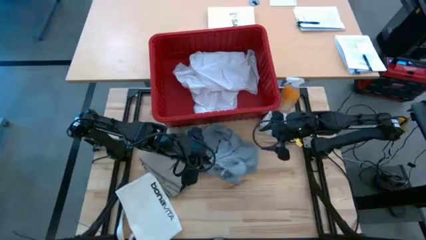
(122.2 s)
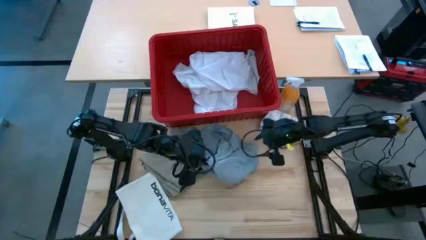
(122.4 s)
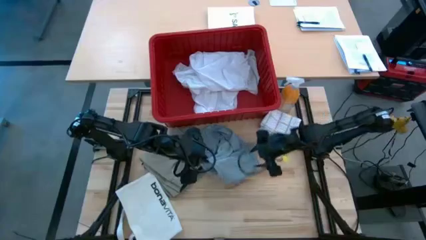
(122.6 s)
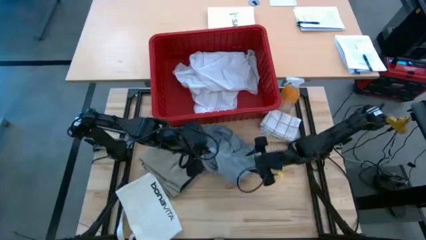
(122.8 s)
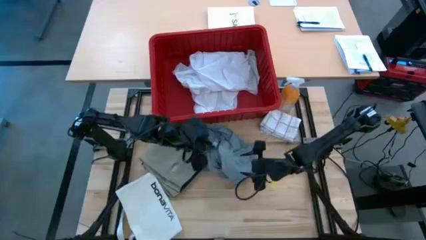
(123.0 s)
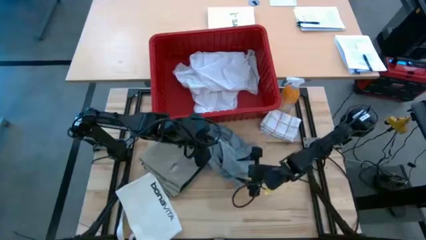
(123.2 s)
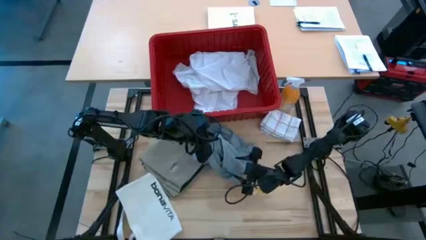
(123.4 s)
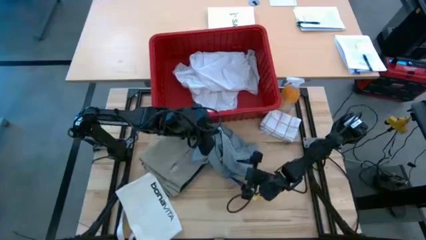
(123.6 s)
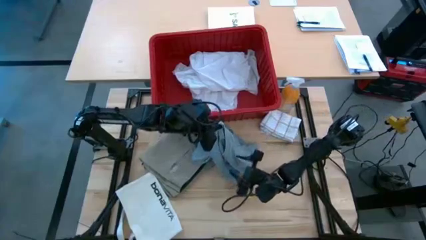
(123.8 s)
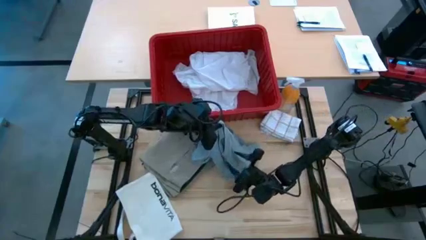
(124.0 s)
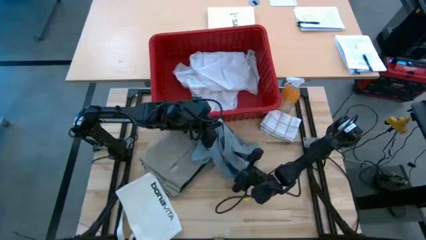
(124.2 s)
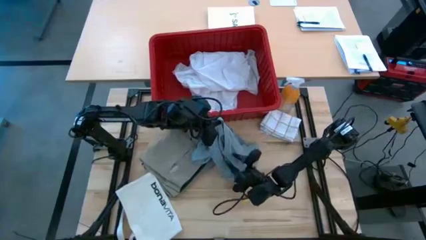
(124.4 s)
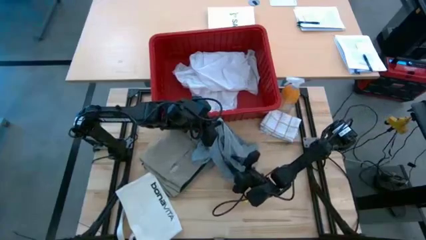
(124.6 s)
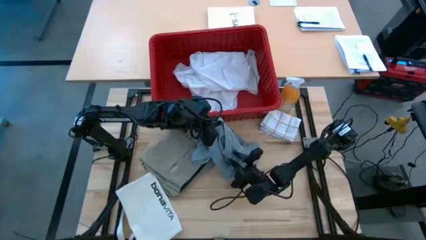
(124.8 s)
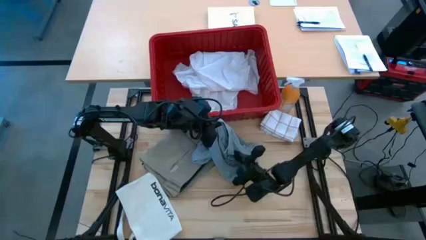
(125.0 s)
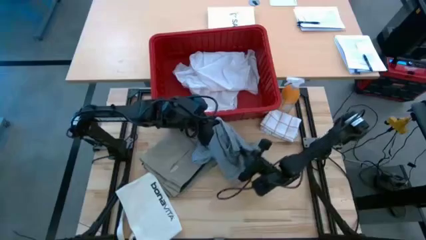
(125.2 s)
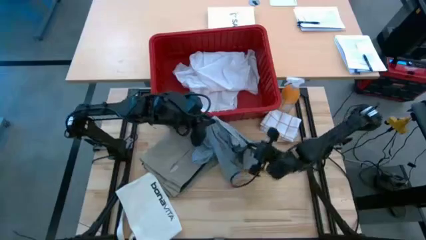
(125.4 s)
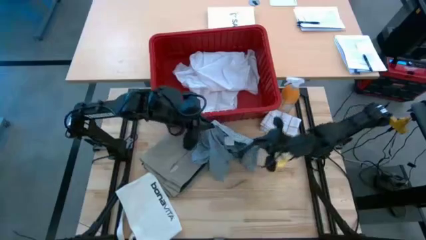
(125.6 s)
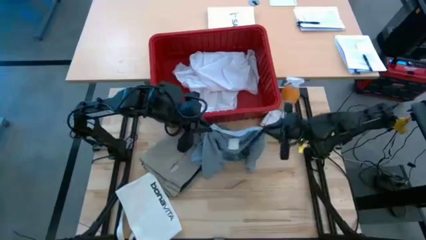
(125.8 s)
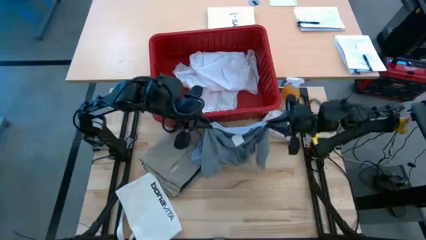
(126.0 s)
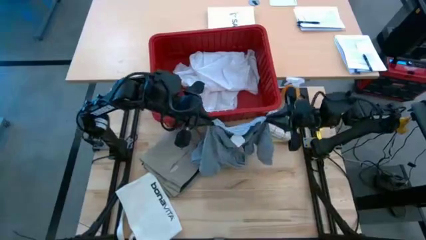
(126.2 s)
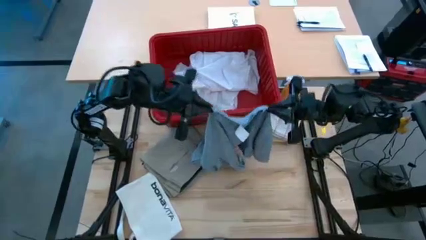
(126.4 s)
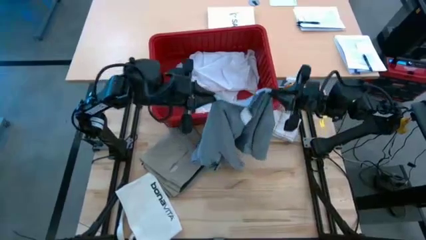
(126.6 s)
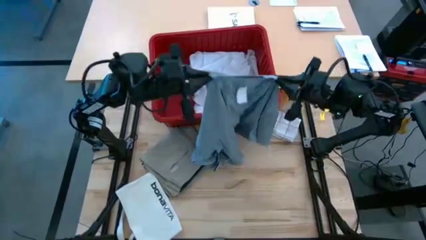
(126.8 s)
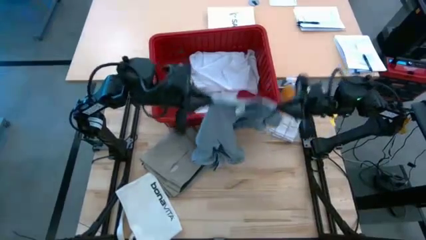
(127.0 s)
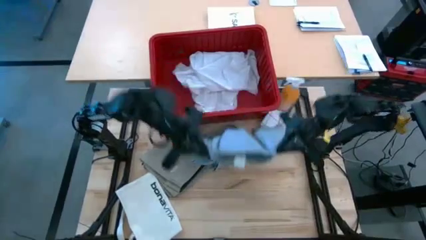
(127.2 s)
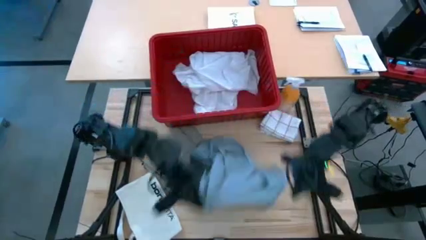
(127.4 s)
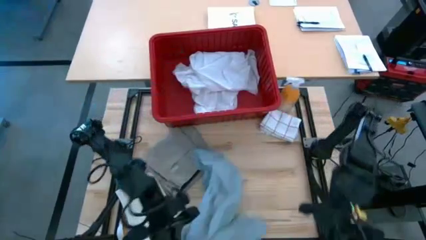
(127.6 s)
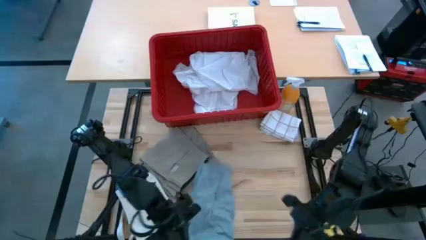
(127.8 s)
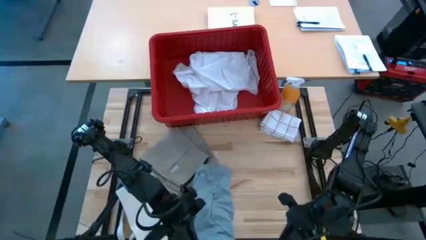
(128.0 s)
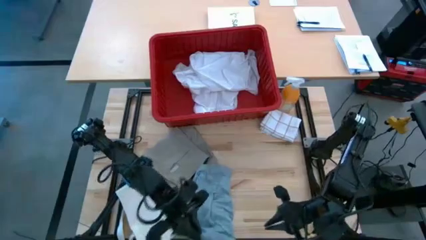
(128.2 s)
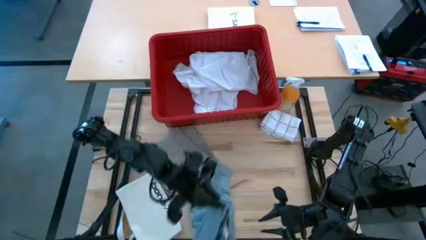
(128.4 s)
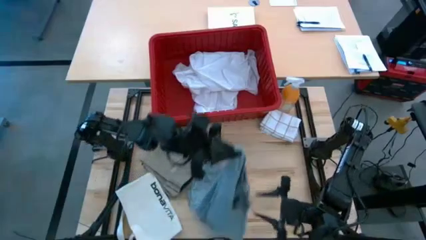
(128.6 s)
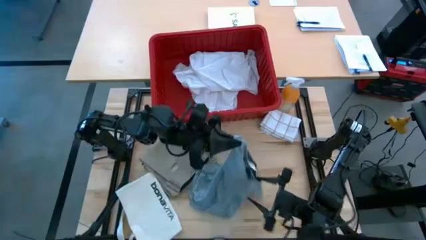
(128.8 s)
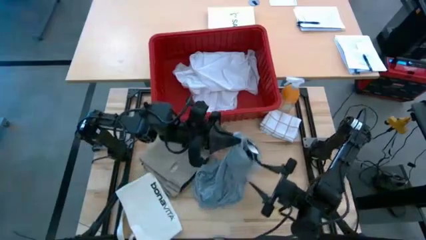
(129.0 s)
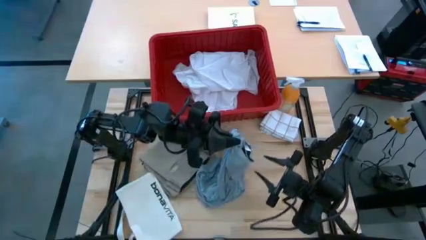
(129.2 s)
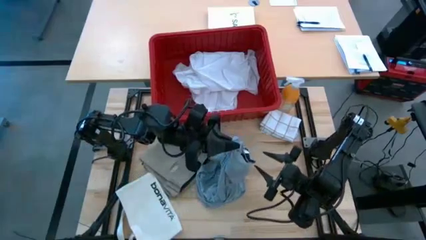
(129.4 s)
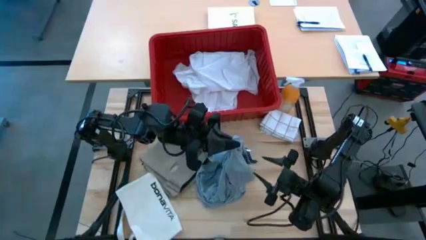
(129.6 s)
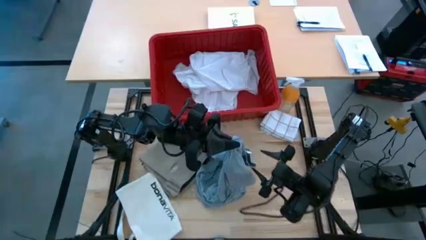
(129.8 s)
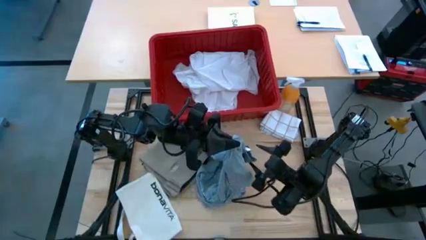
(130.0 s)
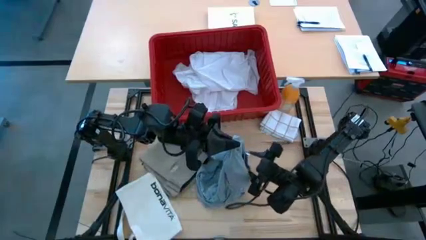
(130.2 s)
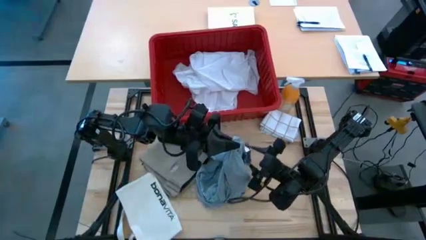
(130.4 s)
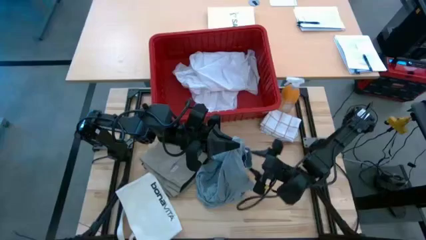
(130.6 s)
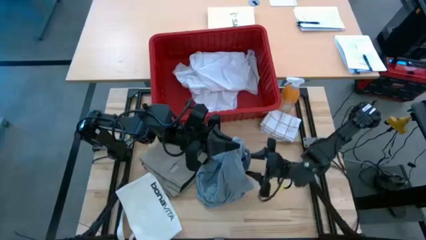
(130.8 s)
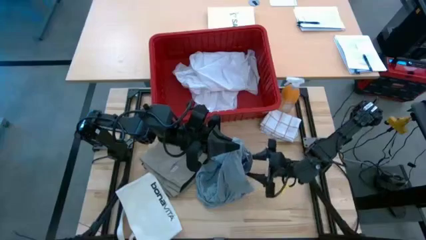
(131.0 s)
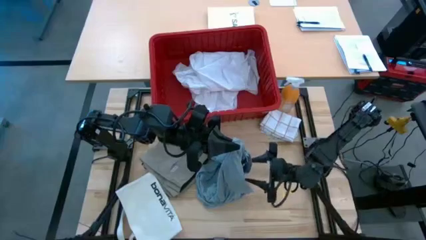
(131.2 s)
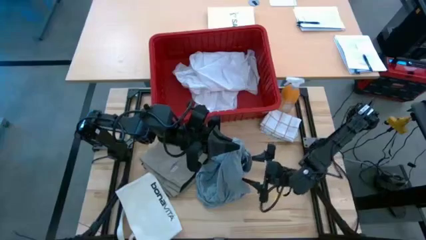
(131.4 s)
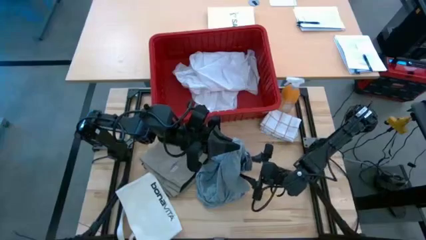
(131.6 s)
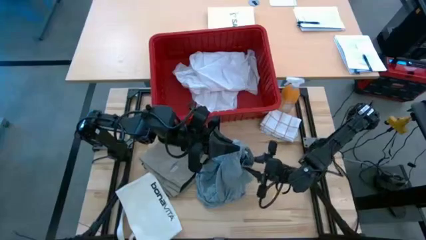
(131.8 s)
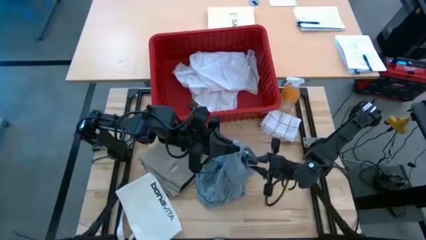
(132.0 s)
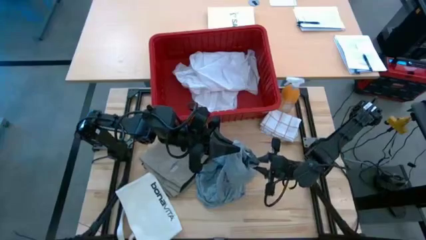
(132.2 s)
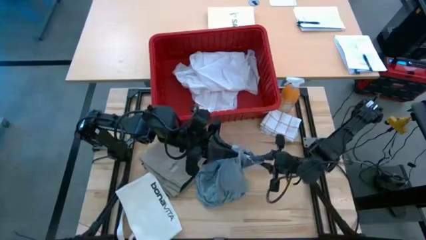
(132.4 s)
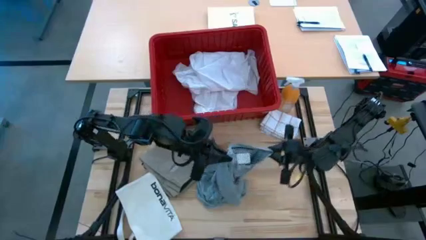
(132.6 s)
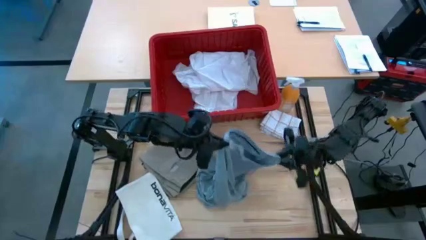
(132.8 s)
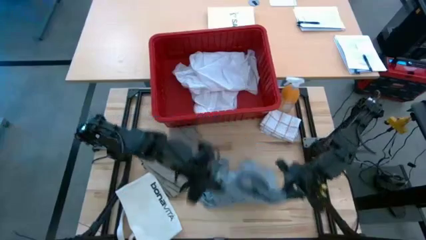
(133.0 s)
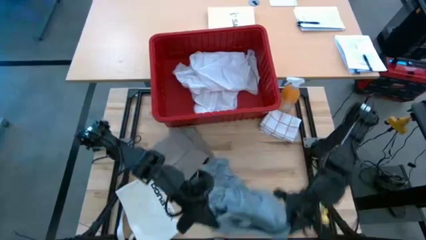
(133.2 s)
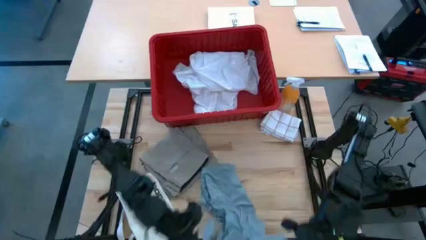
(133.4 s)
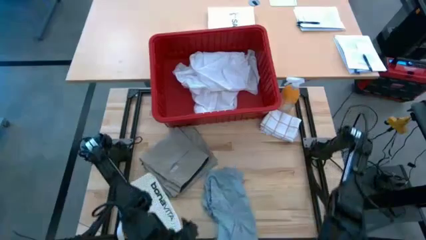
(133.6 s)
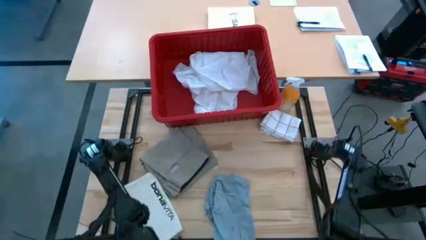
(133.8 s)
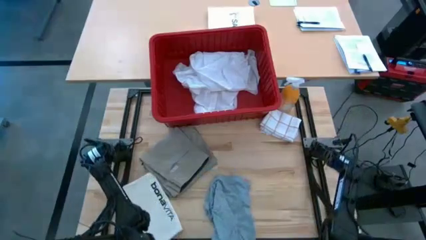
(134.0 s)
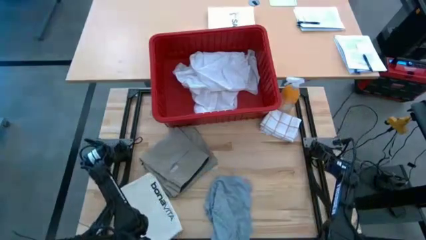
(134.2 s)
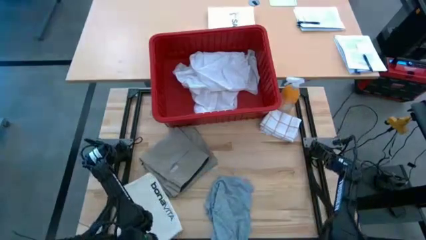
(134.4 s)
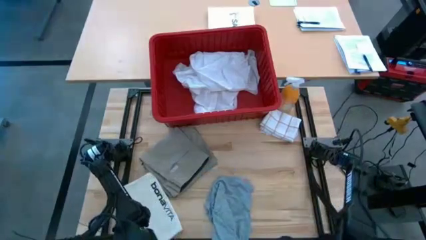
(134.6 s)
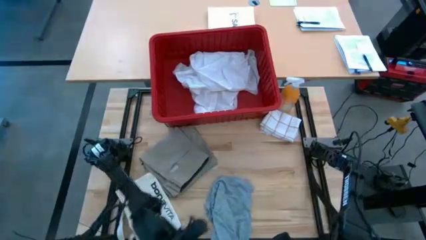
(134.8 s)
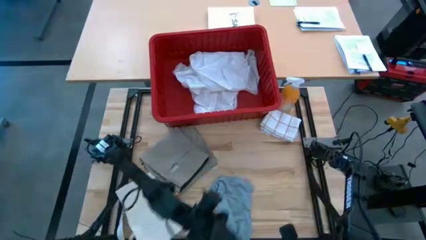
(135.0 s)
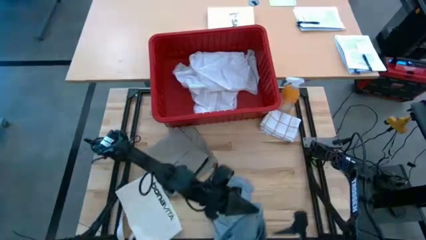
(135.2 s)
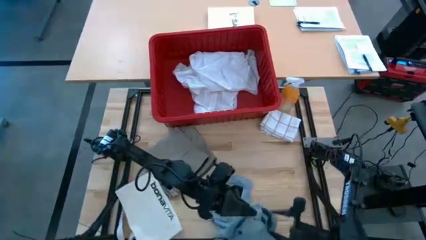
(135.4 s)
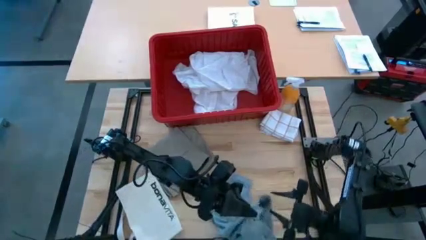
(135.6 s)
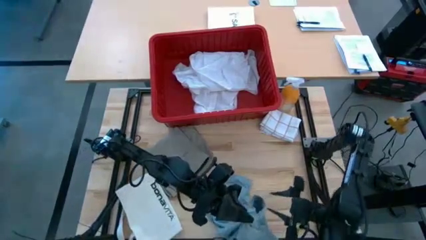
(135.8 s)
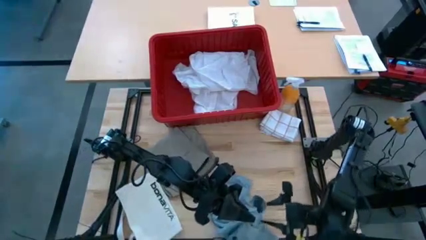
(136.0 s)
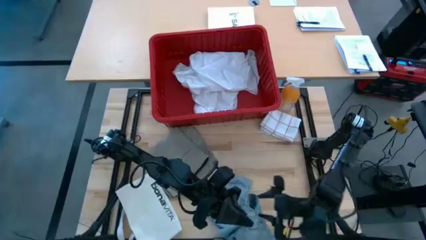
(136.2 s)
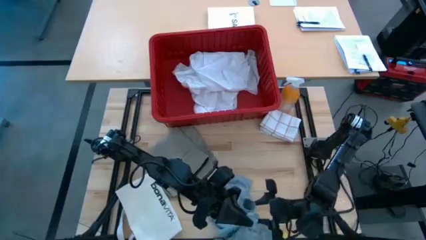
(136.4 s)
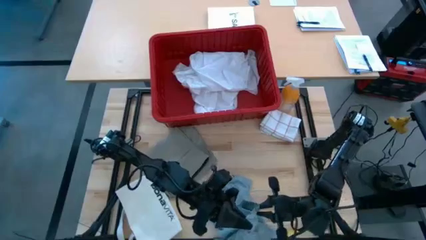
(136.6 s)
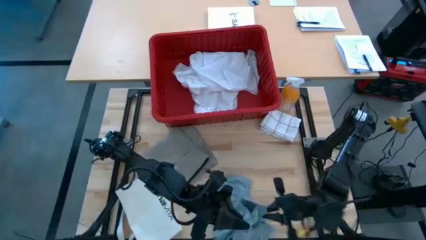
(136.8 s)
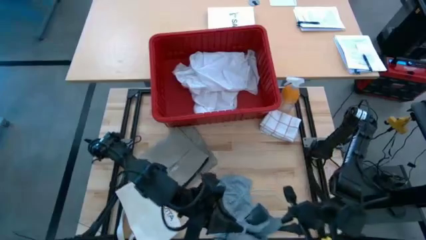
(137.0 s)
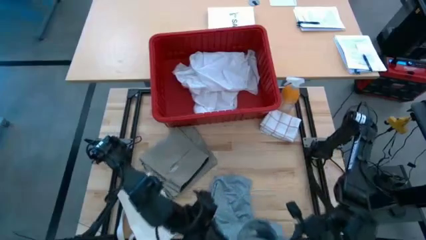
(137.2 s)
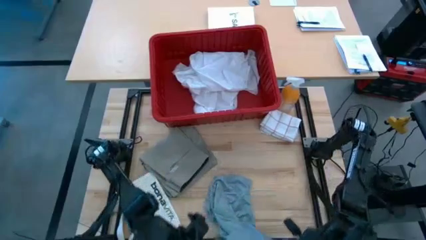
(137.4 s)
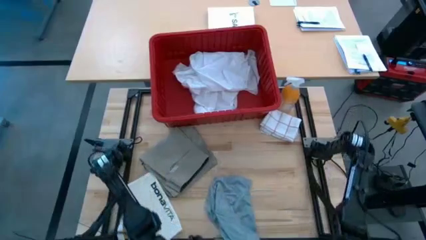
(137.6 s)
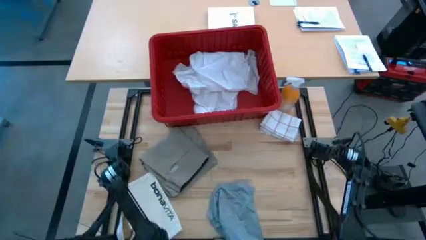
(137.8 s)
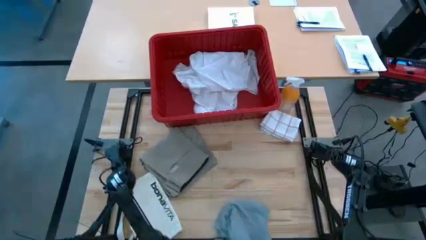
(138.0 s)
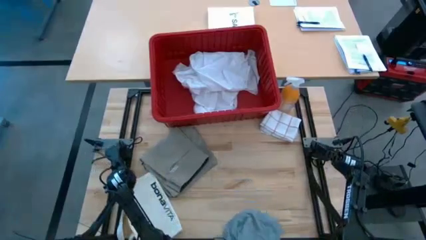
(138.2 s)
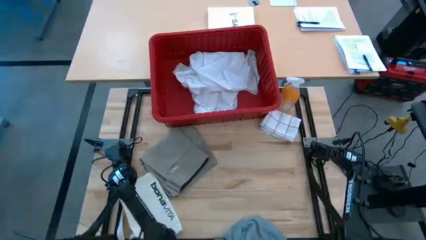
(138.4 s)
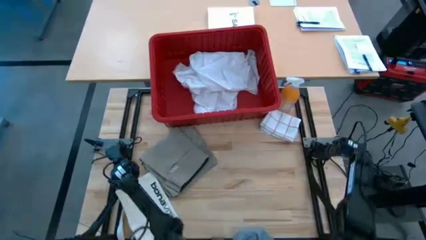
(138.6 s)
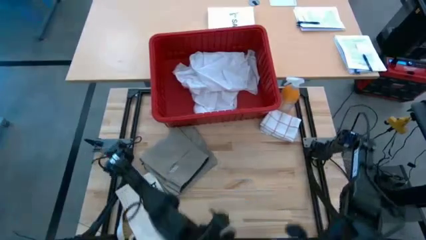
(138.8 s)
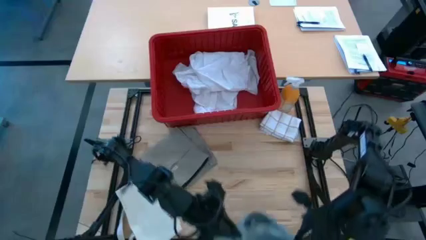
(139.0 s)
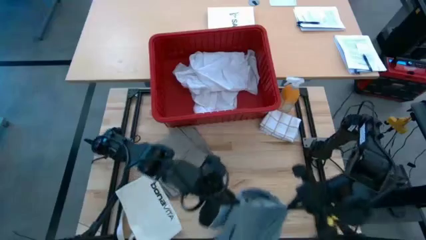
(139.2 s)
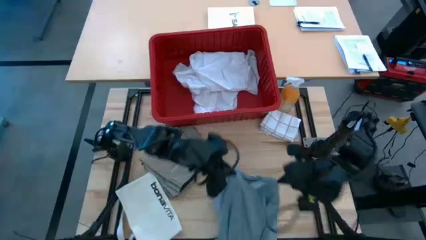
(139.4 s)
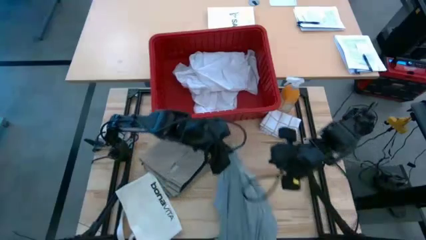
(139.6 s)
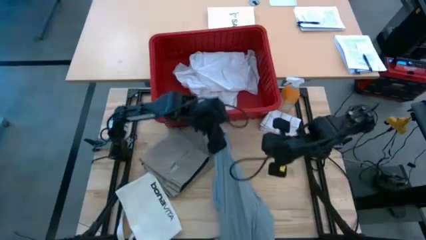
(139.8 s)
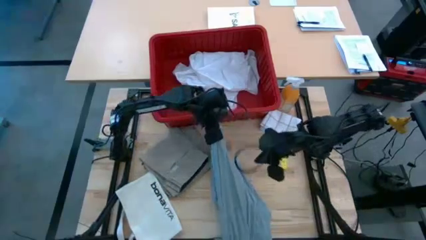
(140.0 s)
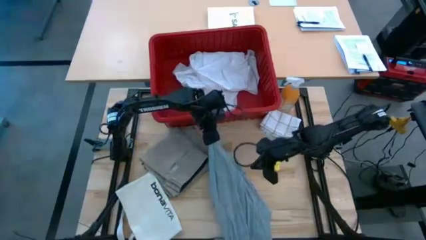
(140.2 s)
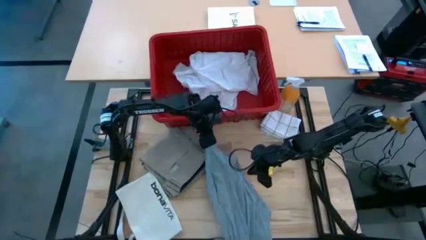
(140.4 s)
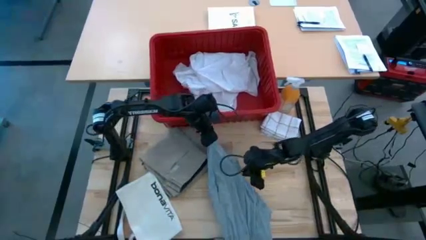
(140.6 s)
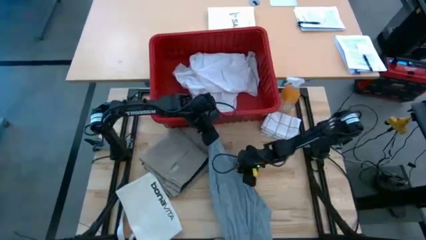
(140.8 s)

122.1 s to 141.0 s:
Task: Fold laundry
Fold the gray shirt
